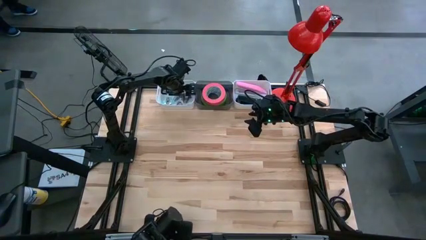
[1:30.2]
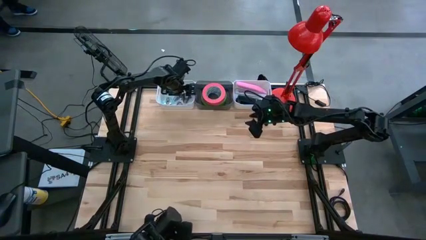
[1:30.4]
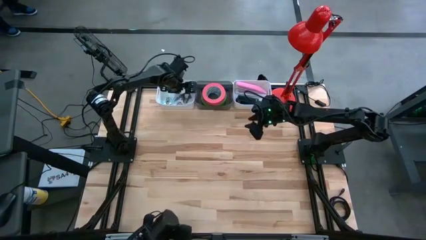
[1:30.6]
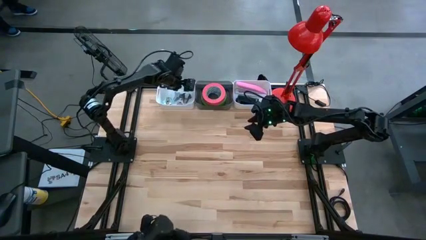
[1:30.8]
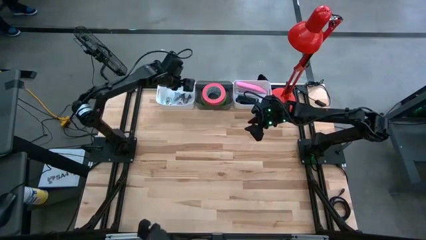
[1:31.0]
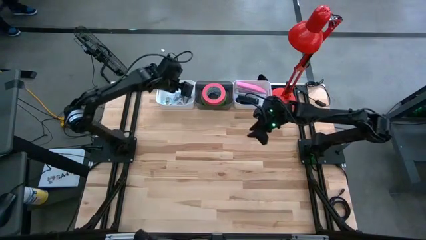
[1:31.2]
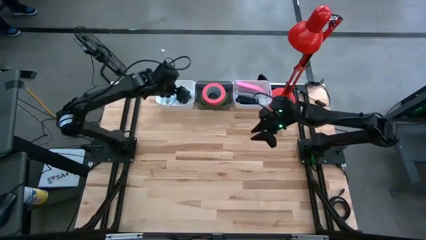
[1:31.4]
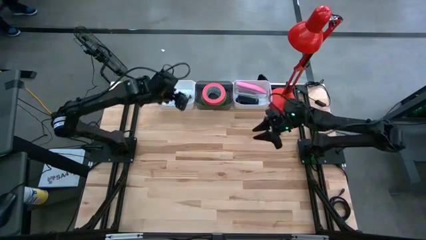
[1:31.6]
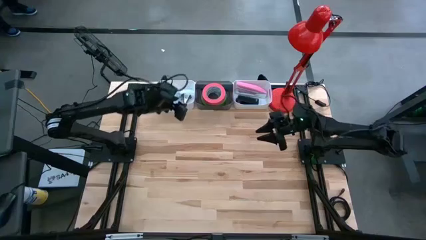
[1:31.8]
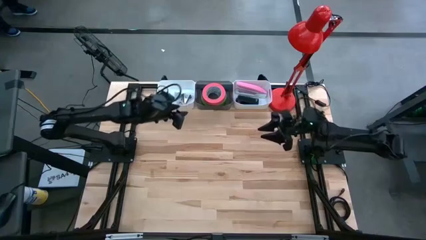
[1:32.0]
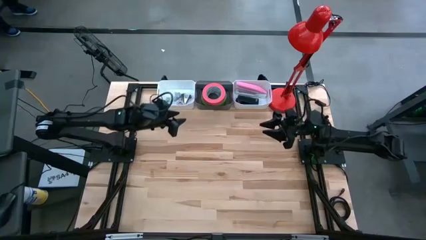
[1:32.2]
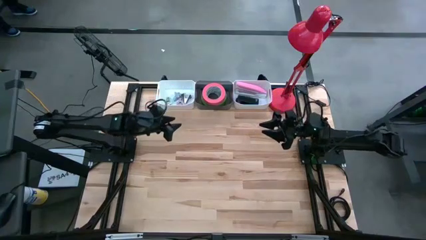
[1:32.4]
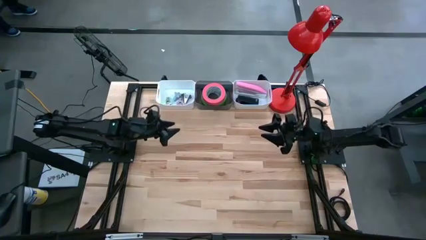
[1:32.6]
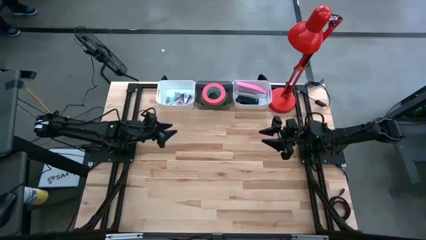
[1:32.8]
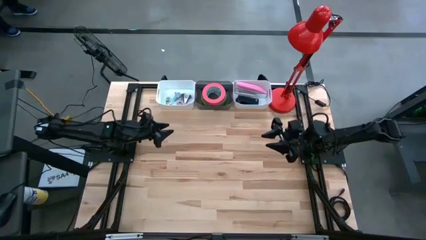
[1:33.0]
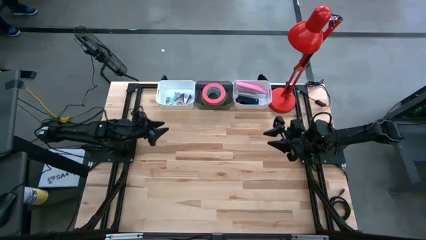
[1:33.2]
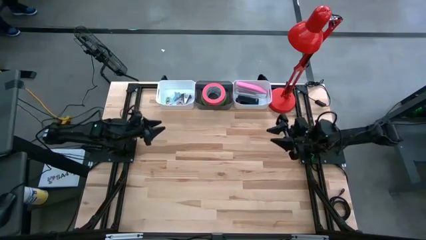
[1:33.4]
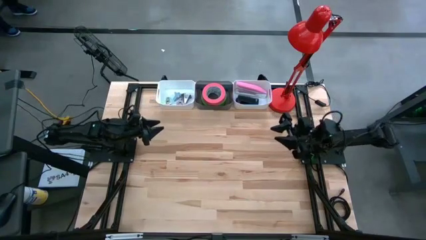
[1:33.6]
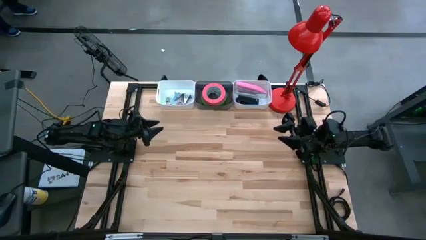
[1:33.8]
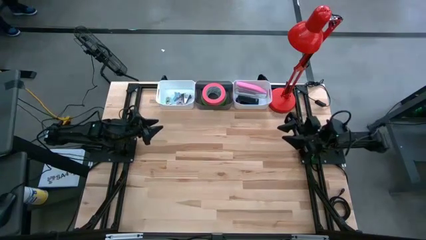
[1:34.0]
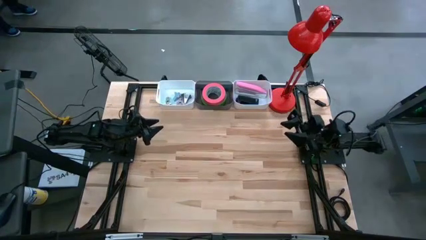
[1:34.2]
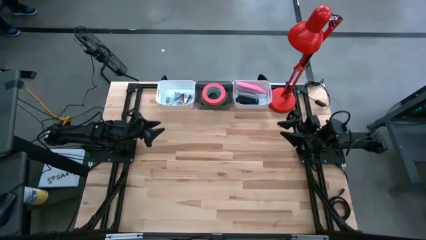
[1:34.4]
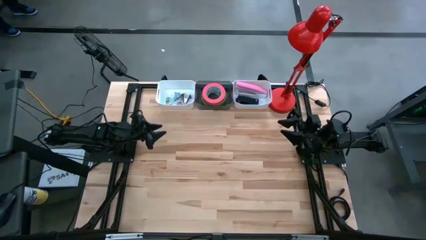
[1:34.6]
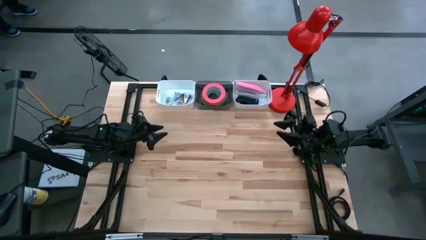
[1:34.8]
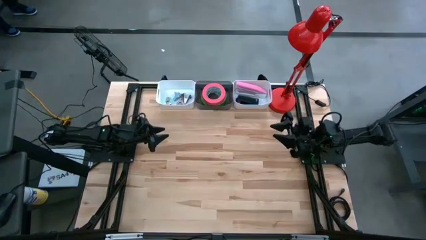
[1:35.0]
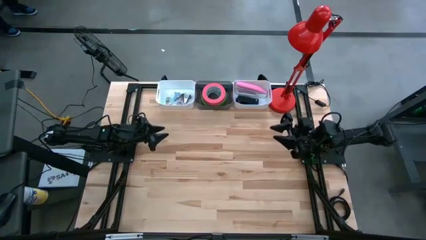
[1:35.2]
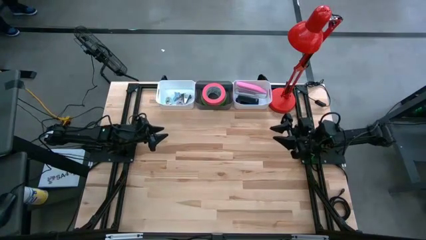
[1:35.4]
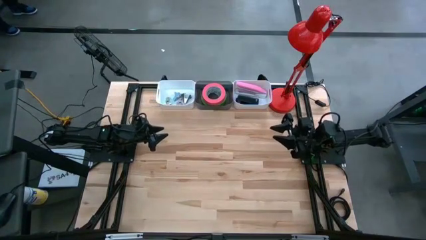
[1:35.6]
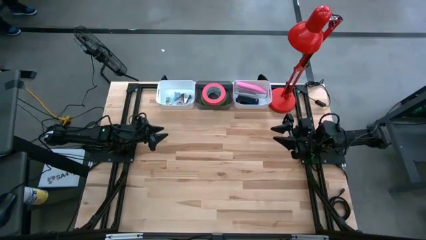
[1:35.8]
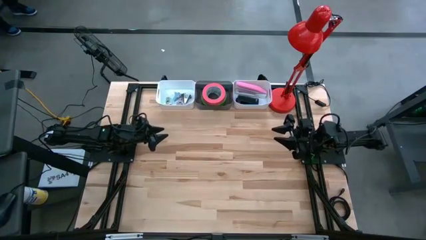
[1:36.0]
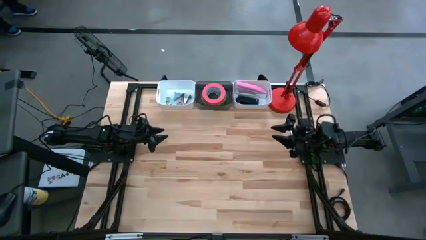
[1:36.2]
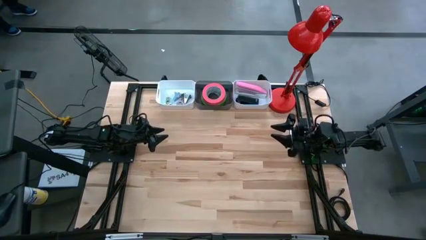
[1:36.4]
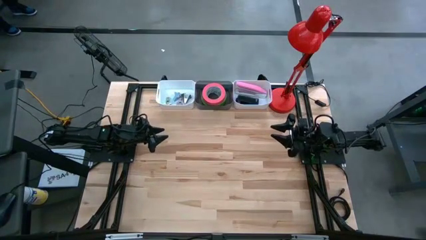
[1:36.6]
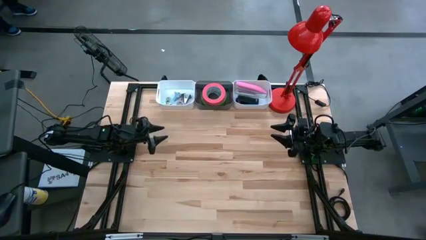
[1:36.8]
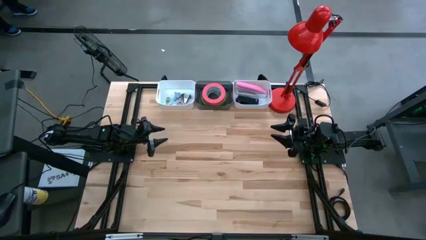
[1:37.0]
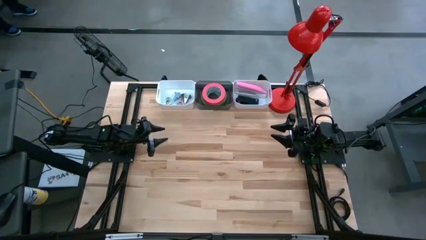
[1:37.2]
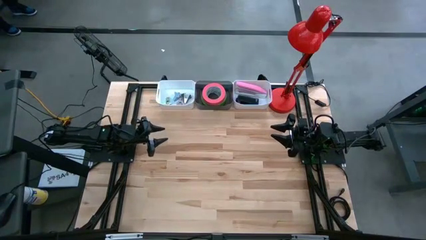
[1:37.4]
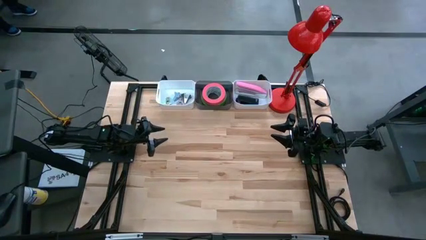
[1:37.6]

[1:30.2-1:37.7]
Task: Pick and place Stapler, Stapler remover, tape
Return to Home Position
